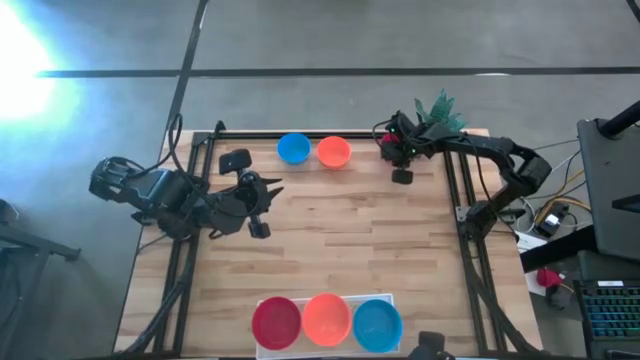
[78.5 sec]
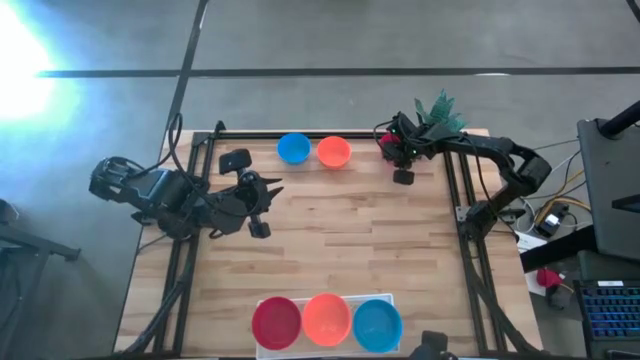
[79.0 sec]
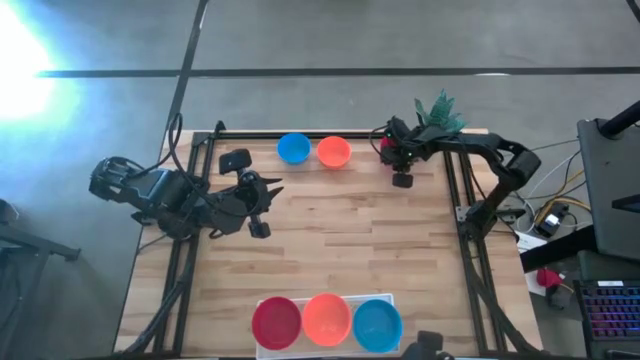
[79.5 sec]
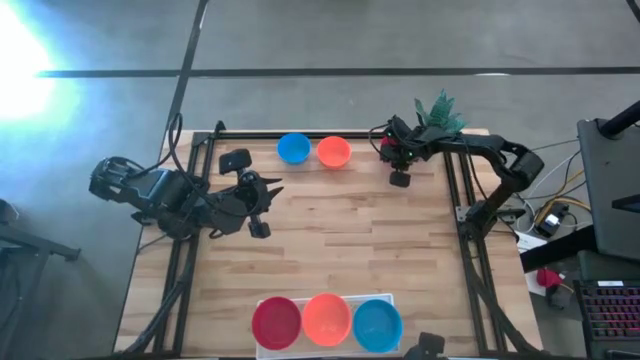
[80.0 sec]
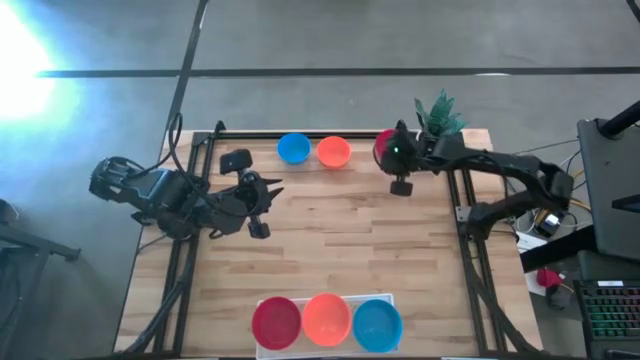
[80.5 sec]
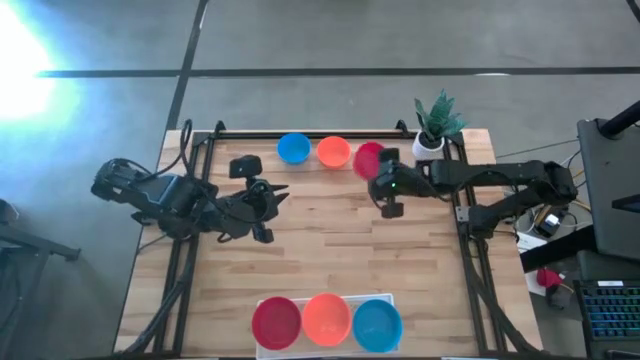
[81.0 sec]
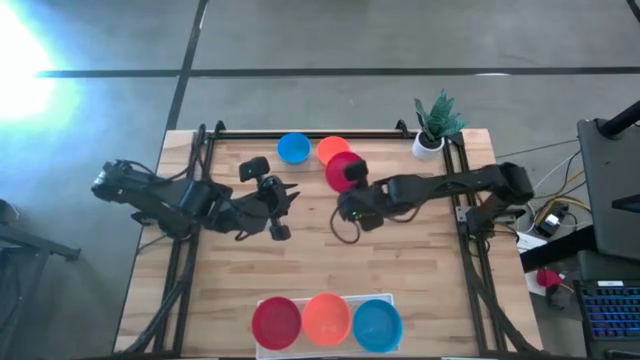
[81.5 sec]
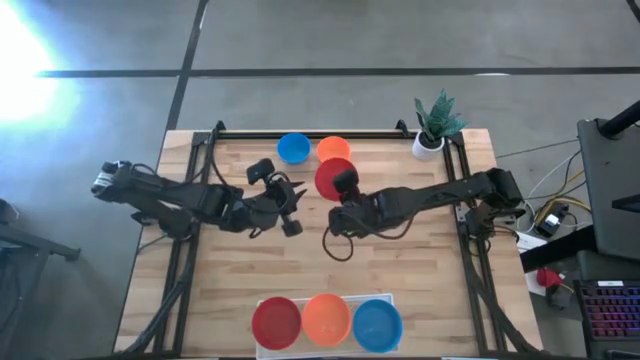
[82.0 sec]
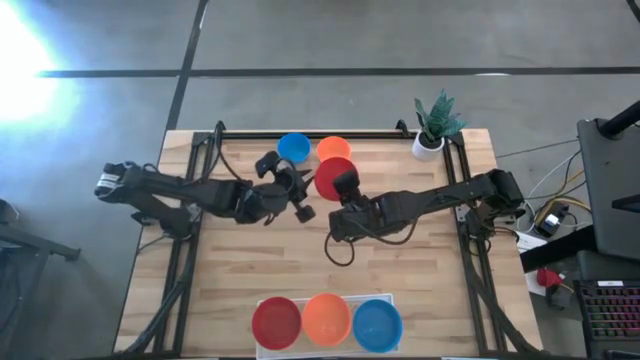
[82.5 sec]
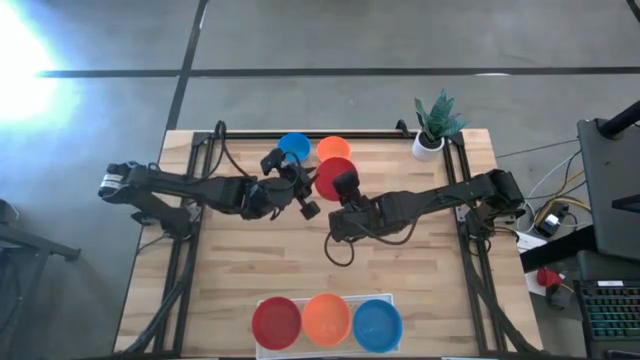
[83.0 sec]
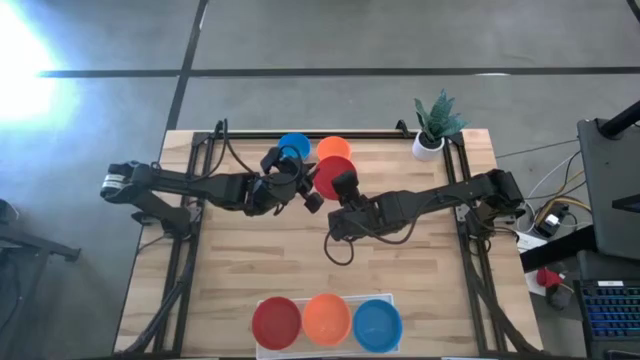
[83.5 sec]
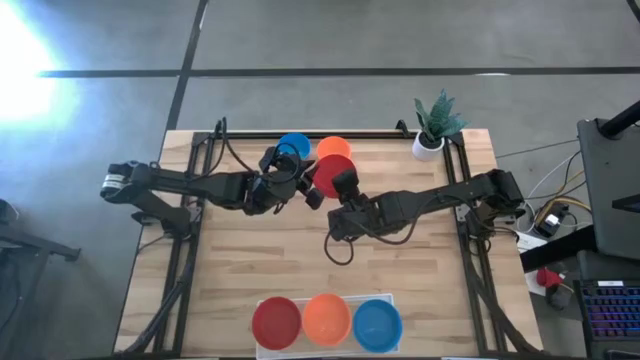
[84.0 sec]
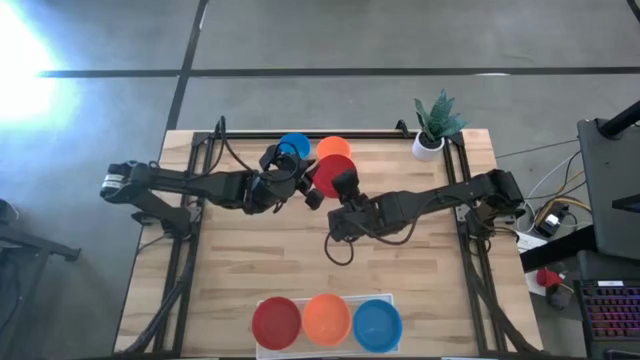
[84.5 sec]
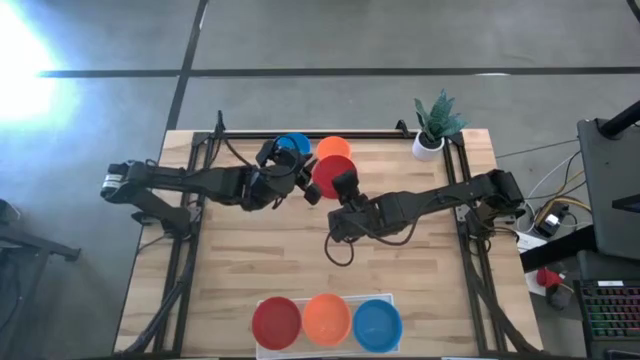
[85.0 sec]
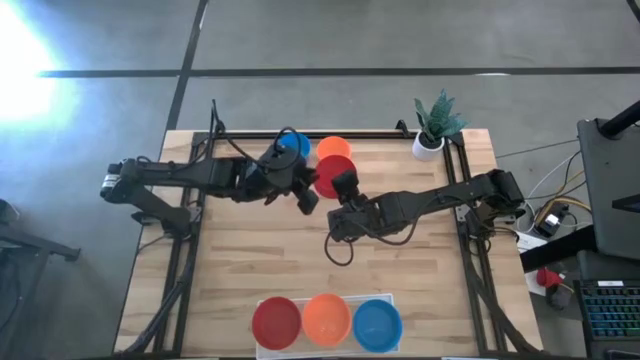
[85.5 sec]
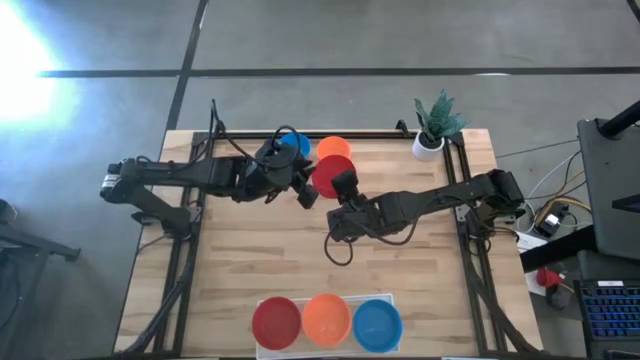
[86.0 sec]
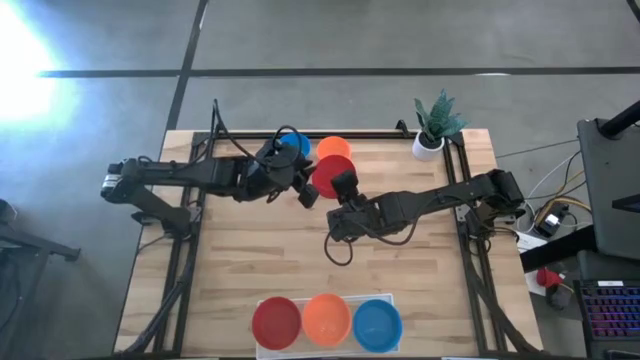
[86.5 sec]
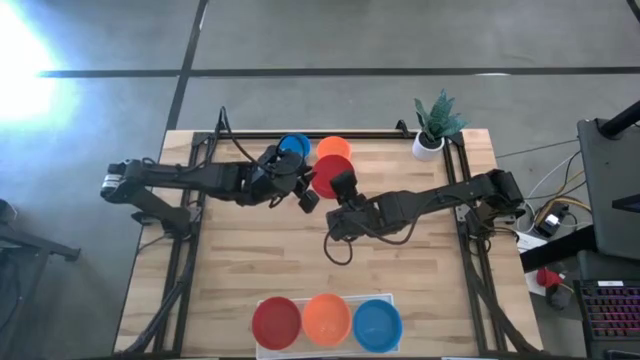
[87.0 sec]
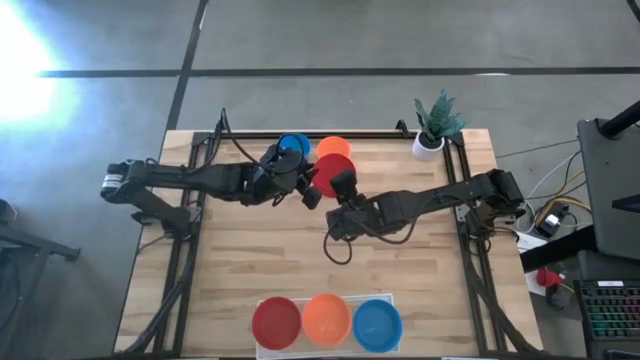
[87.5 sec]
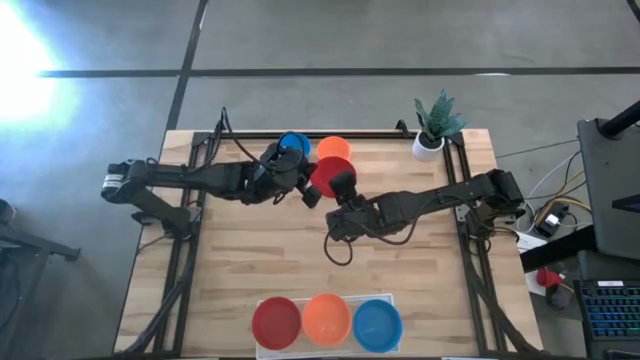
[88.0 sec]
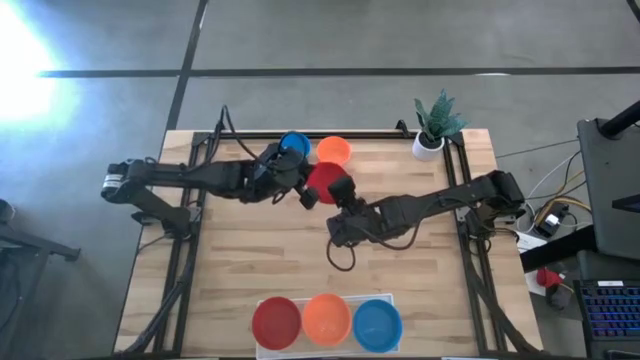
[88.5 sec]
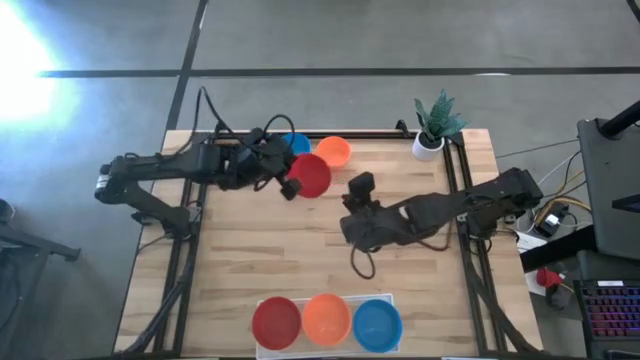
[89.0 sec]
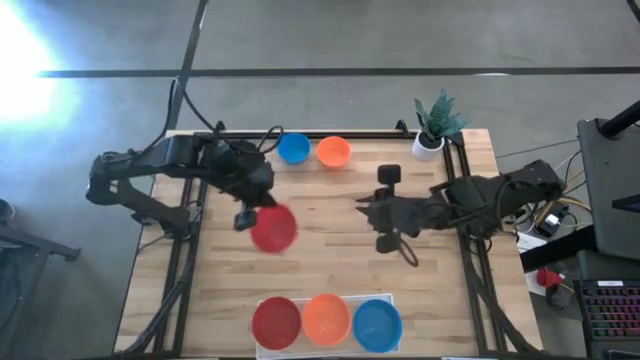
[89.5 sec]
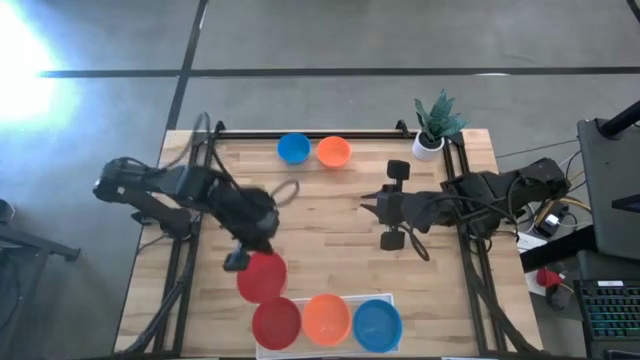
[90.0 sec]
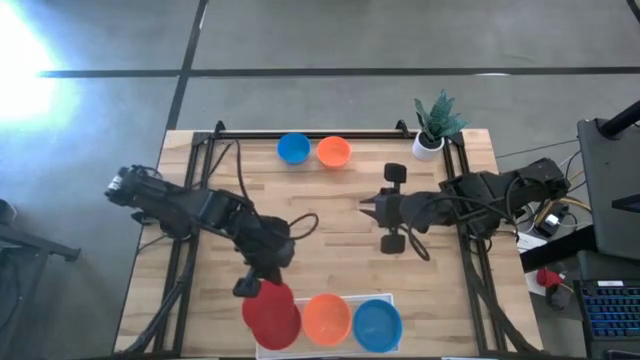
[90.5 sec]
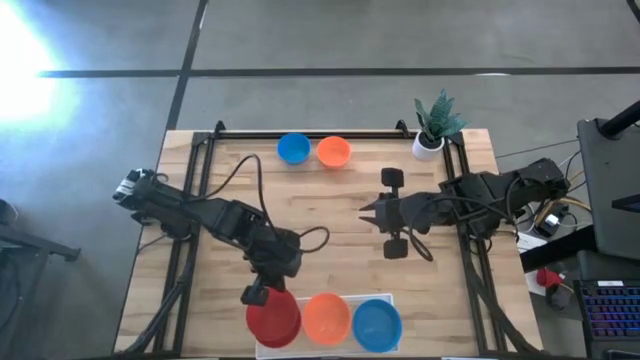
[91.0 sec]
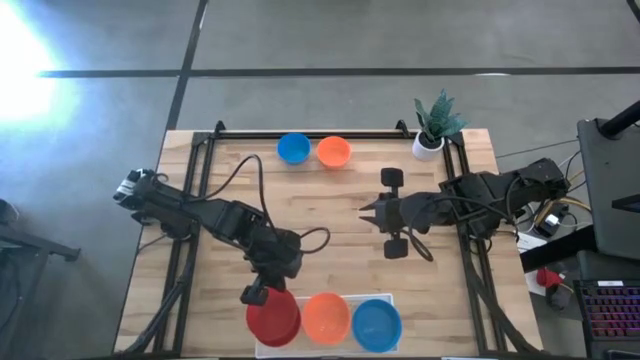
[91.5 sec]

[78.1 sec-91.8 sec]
Task: Pick & Place Mini bowls
Stack the red bowl on top of the other red bowl on the shelf

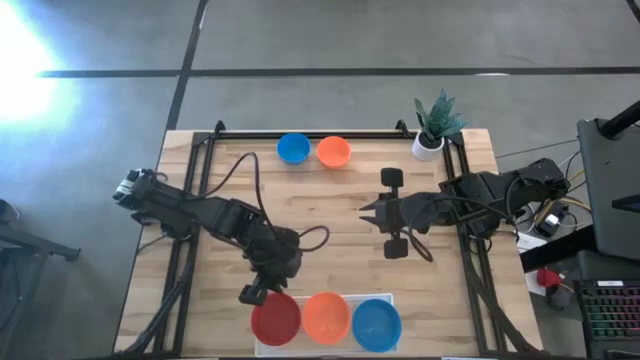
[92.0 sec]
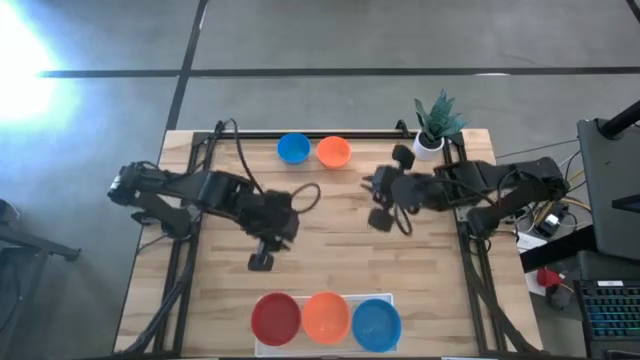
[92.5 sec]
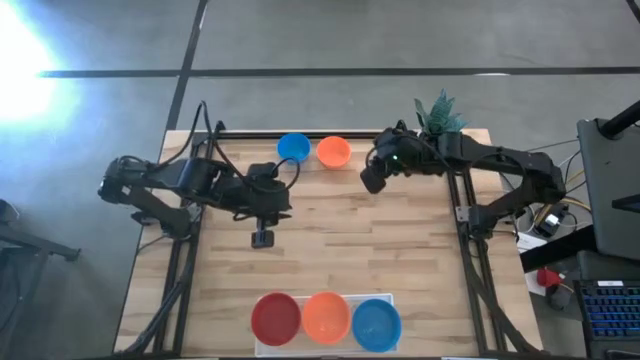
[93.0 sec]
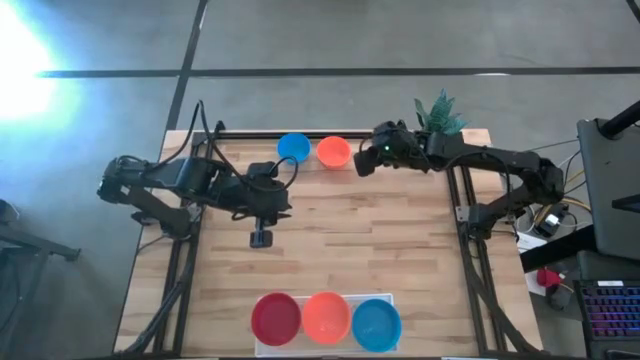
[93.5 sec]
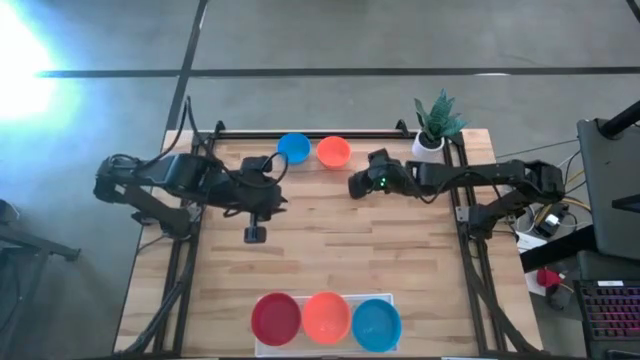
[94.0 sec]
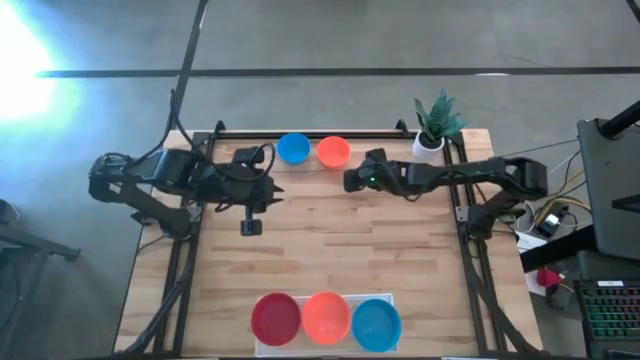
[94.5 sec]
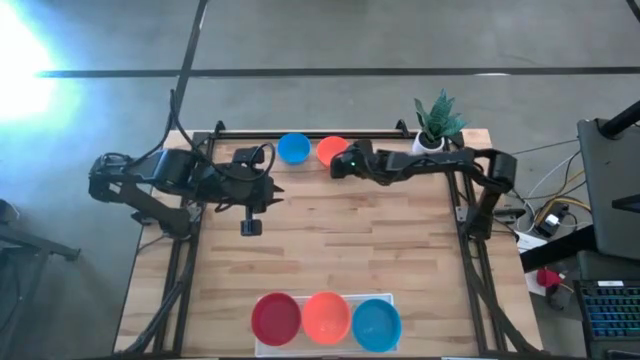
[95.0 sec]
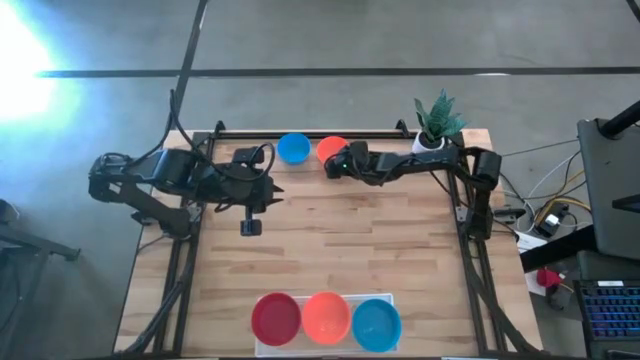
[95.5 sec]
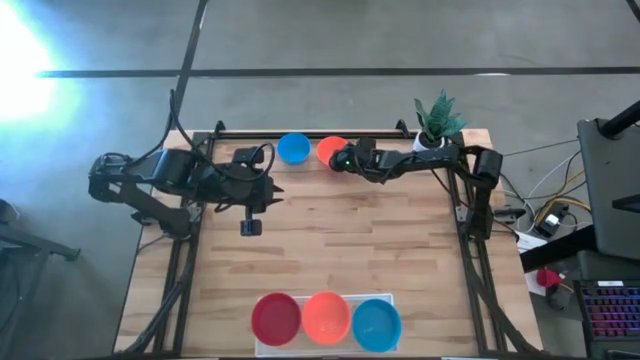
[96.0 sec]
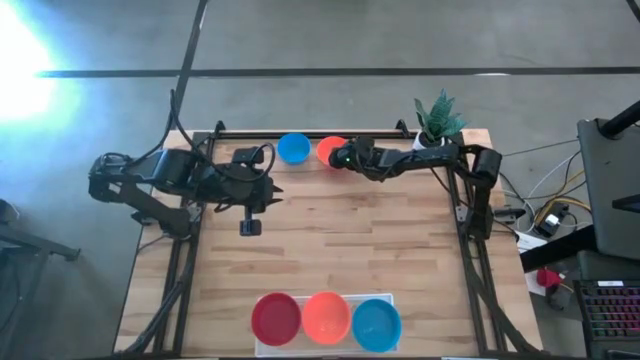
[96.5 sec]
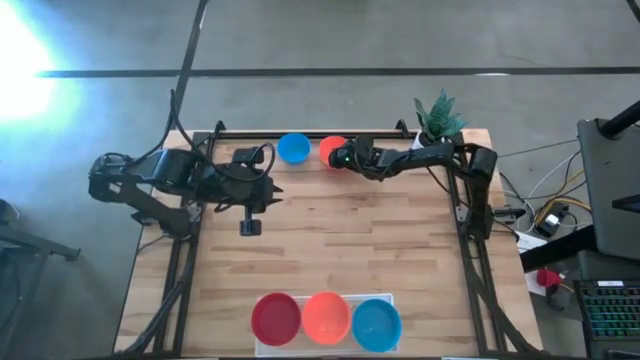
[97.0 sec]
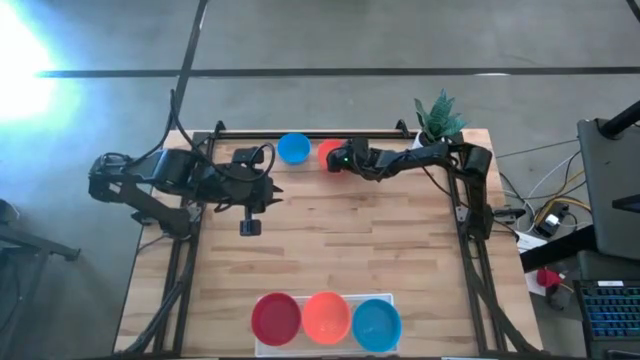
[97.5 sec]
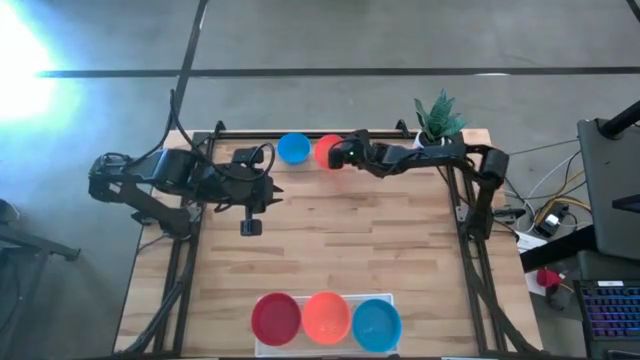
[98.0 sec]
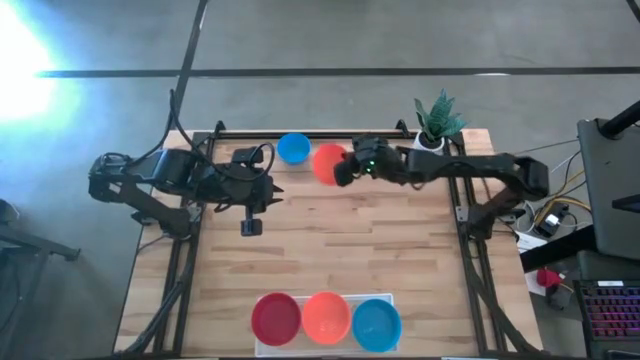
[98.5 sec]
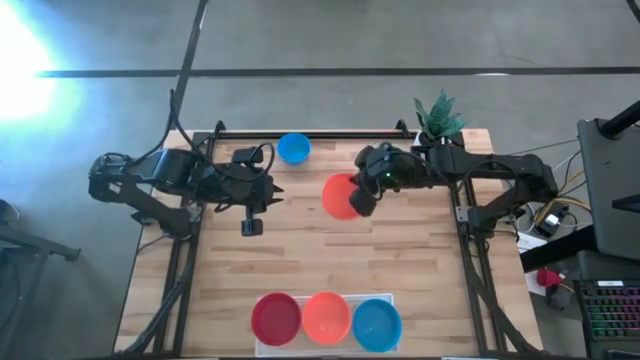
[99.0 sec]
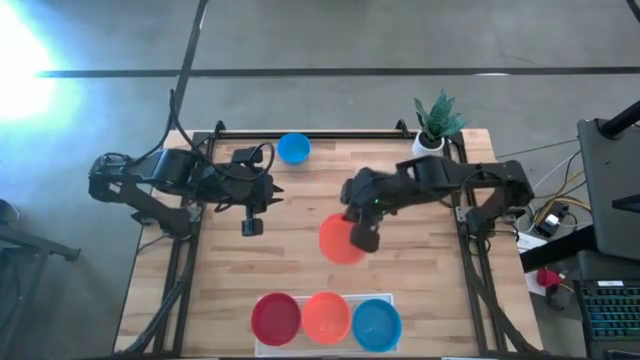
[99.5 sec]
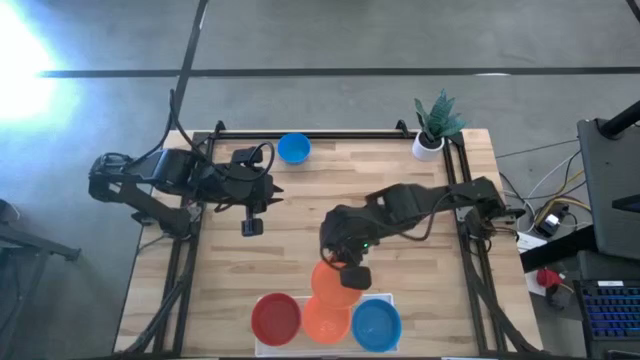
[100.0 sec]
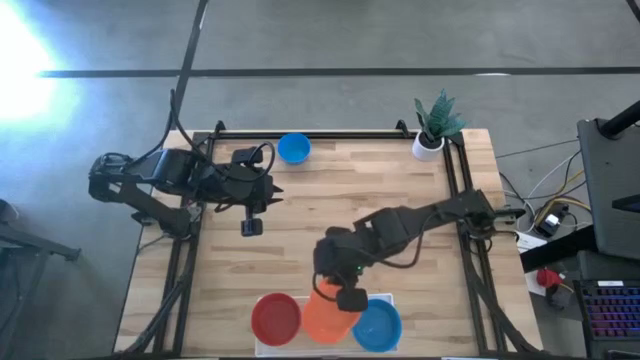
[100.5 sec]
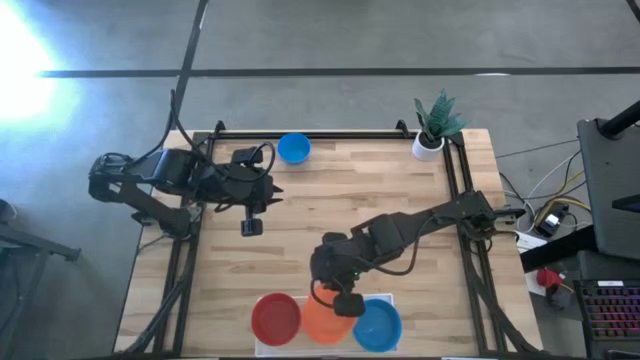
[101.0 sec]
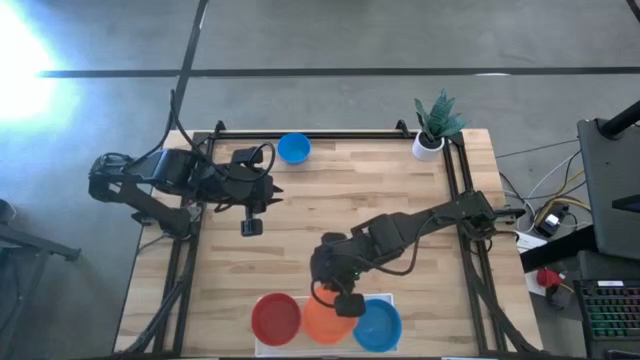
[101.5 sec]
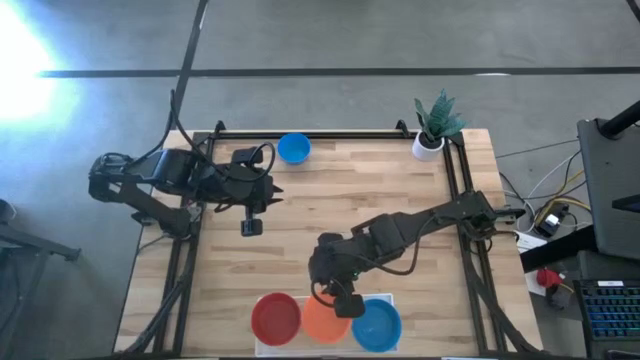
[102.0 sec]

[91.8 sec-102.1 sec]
Stack the orange bowl on top of the other orange bowl on the shelf
